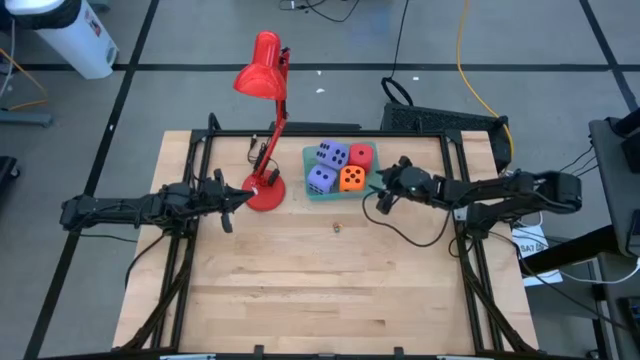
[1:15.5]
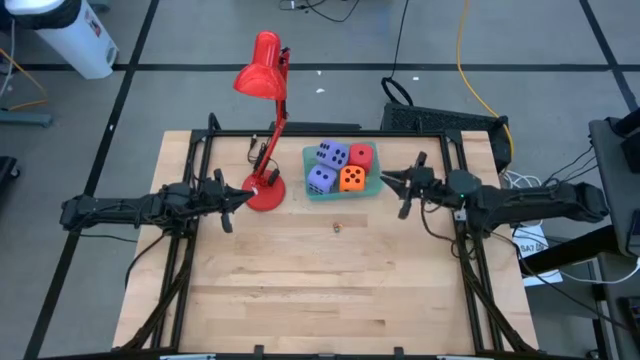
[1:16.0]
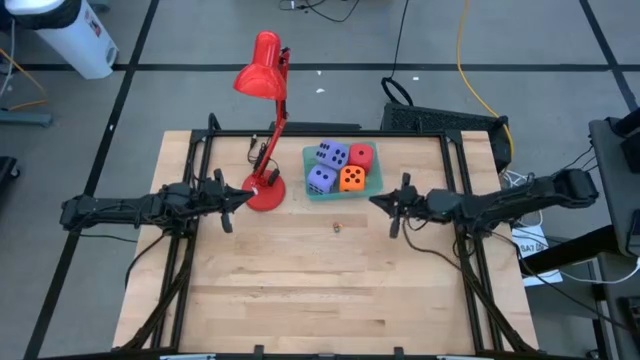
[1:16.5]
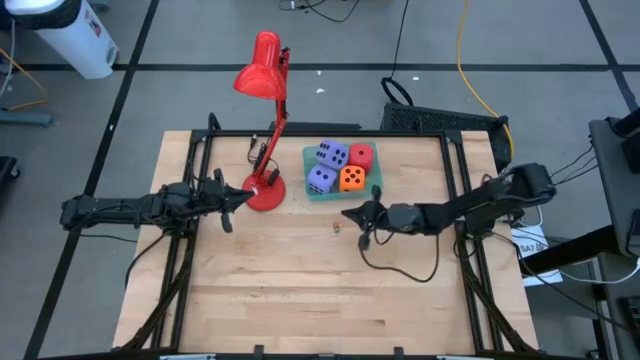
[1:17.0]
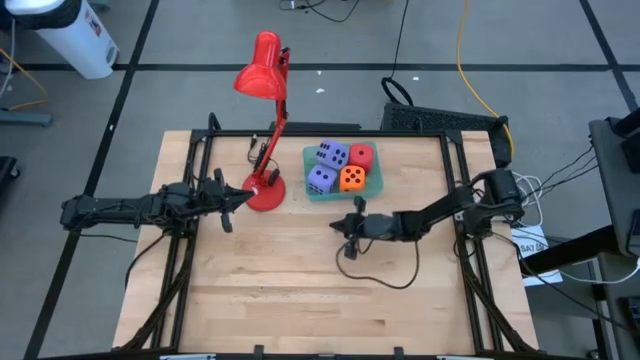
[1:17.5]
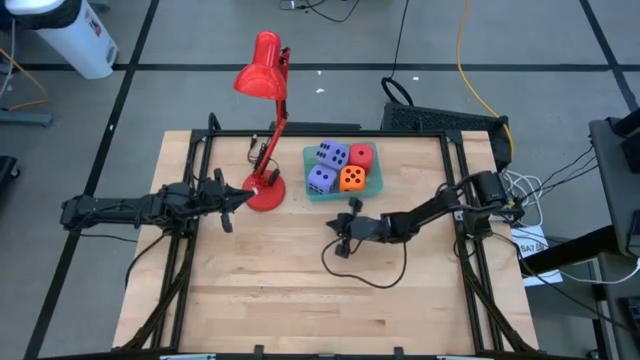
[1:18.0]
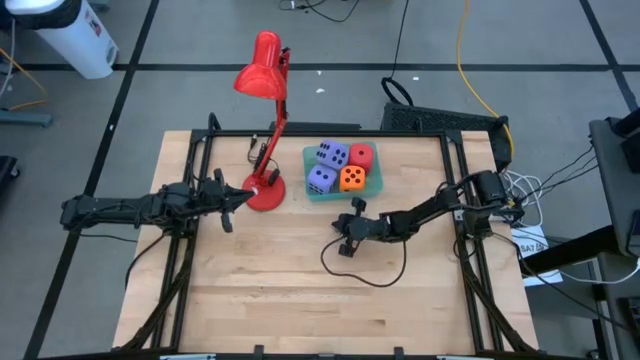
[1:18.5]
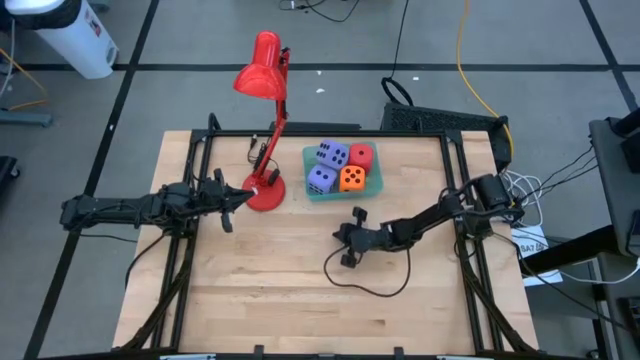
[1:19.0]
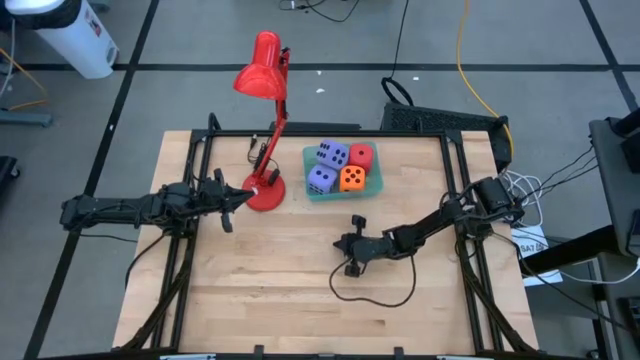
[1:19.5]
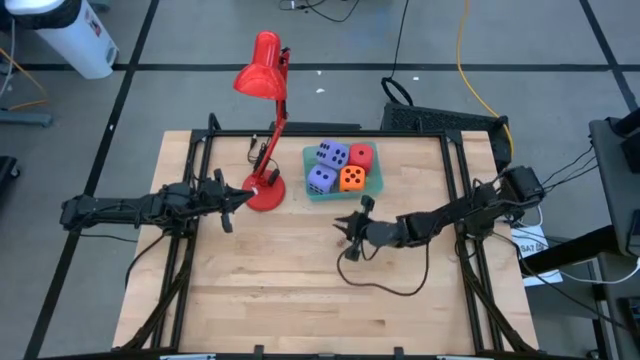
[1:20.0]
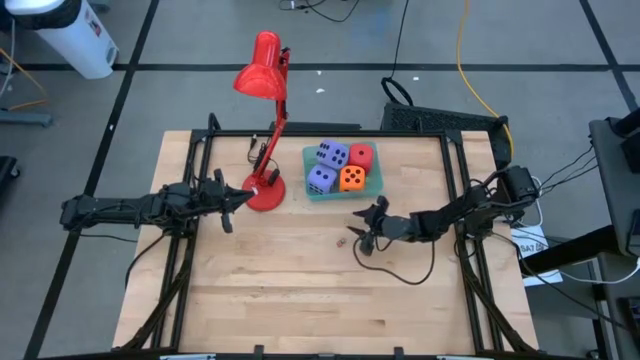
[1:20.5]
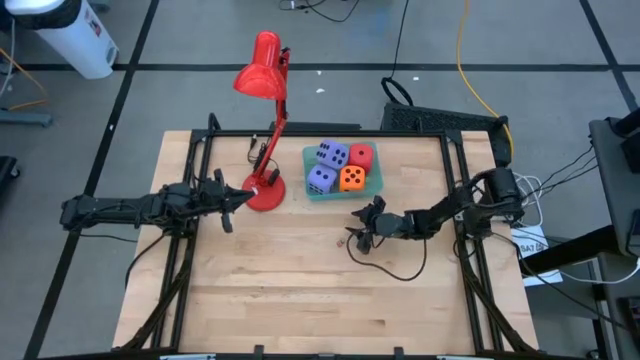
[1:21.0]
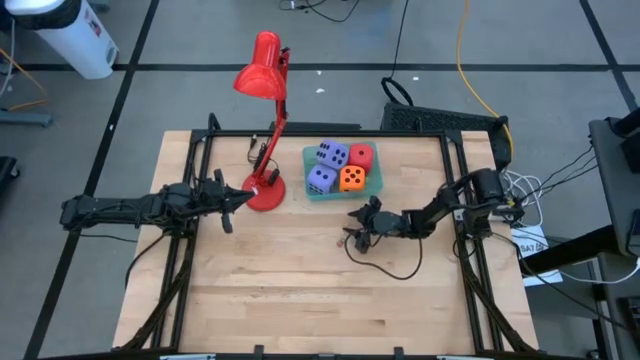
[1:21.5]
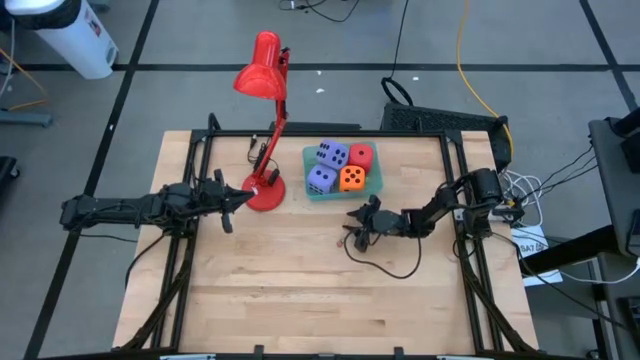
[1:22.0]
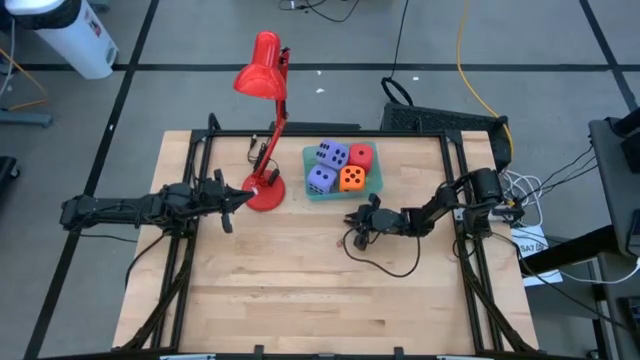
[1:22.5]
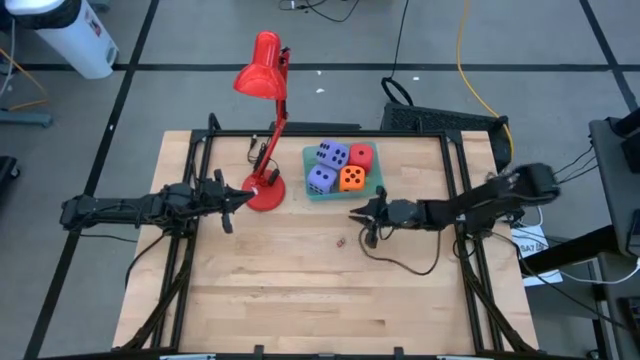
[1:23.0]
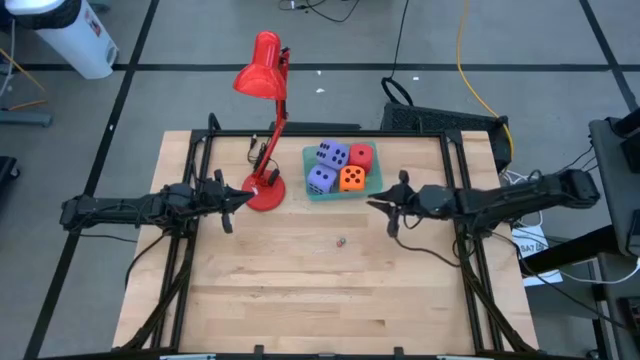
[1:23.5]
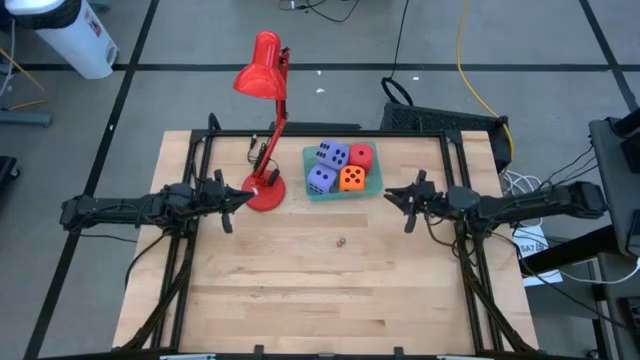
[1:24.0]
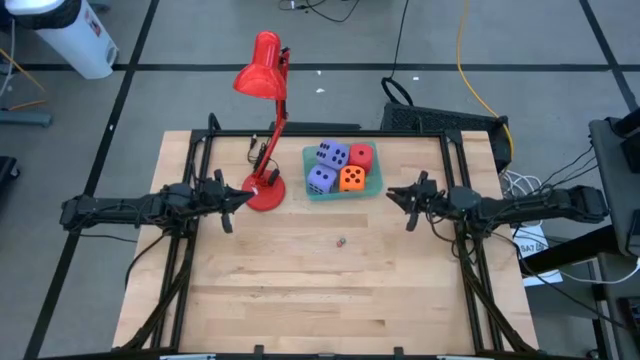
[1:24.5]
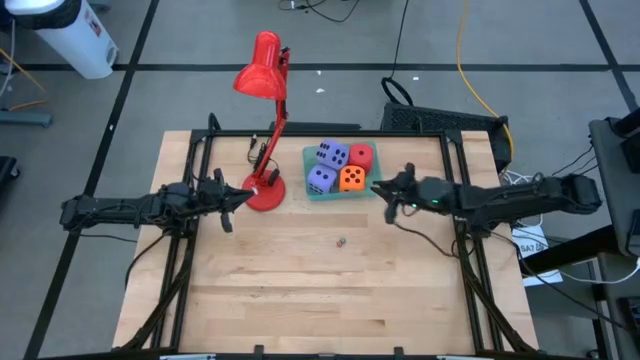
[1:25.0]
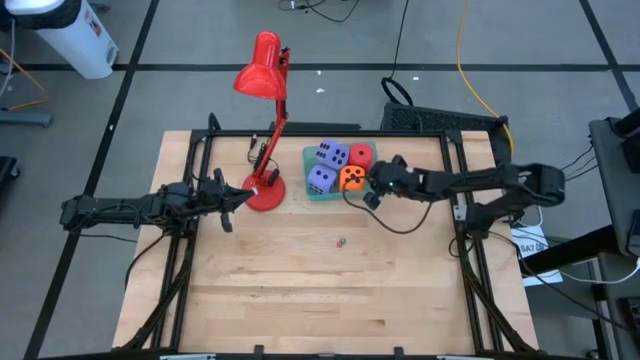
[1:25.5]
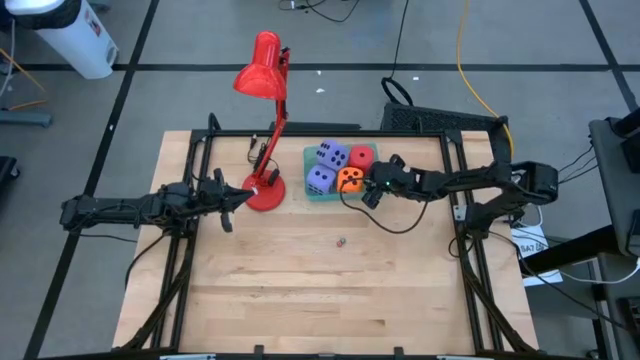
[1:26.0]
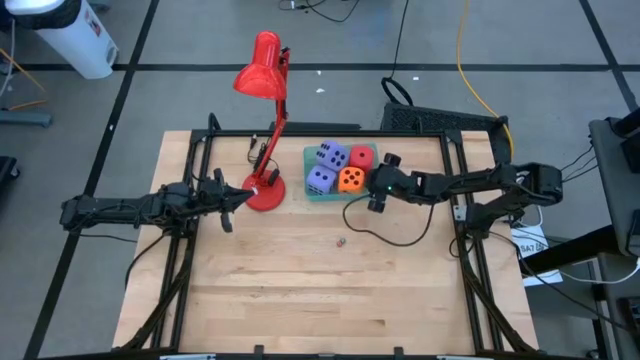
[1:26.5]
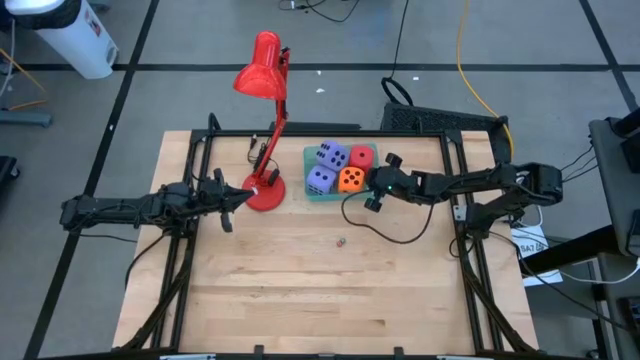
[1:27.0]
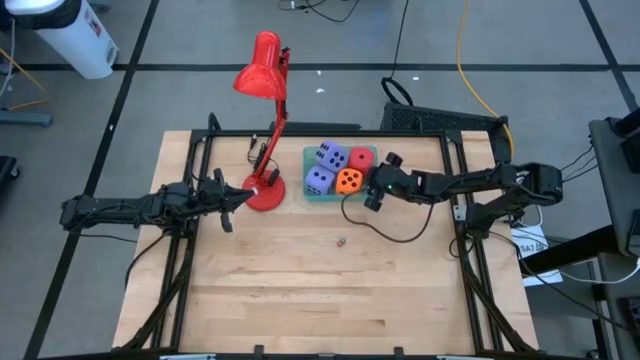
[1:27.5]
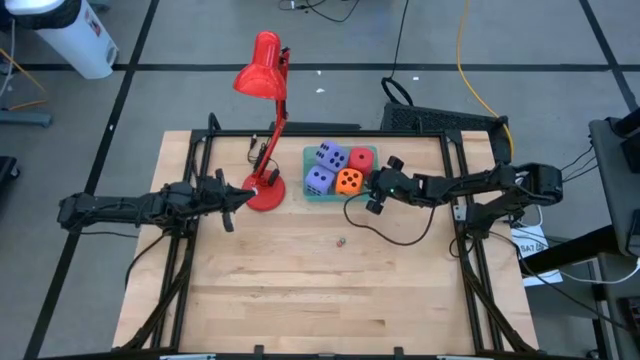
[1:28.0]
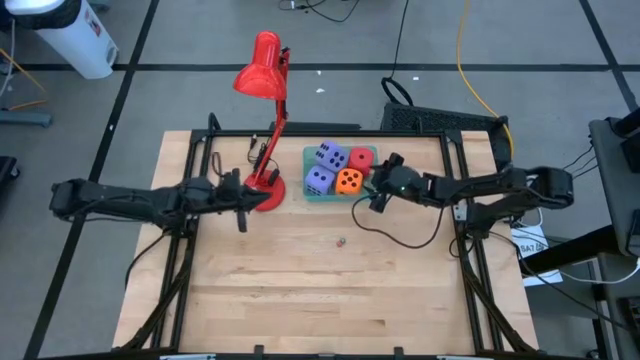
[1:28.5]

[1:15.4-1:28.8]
Task: Pick & Place Dice
Put the yellow small die into the green bin

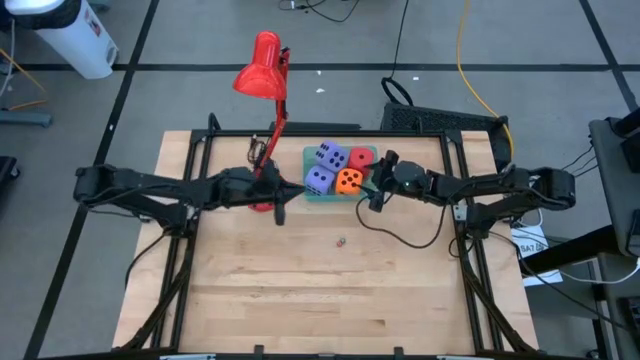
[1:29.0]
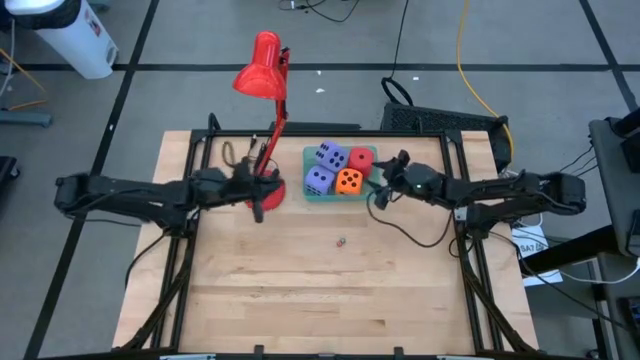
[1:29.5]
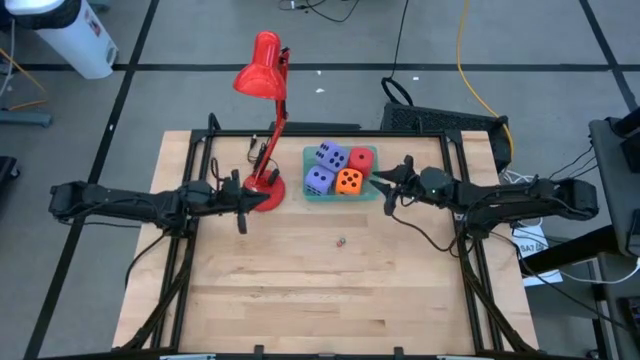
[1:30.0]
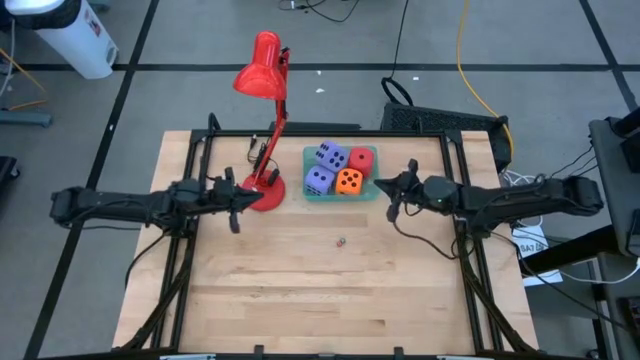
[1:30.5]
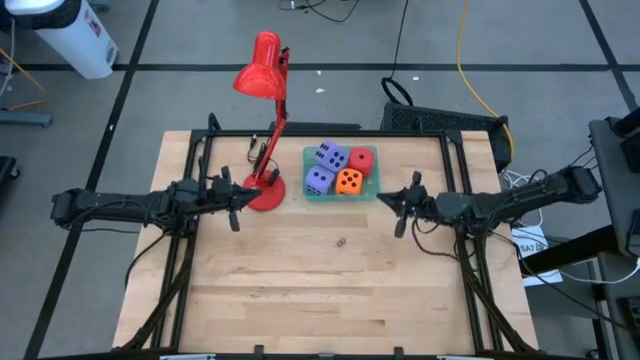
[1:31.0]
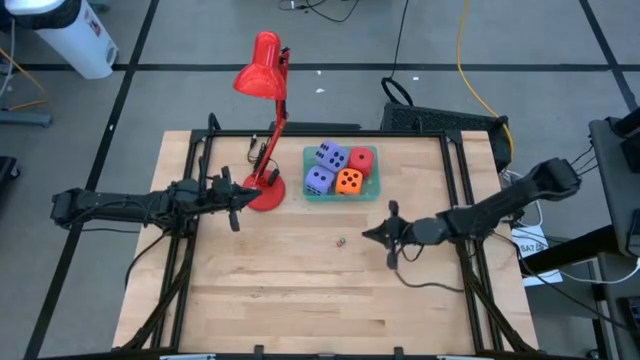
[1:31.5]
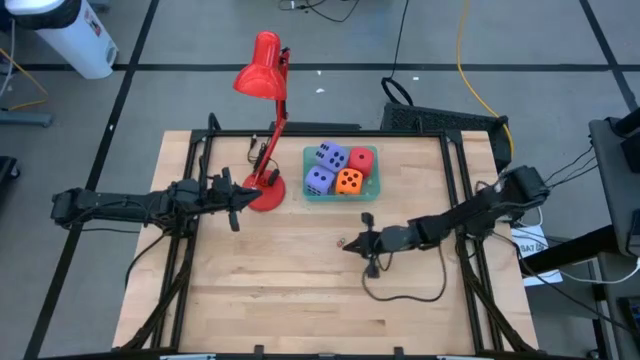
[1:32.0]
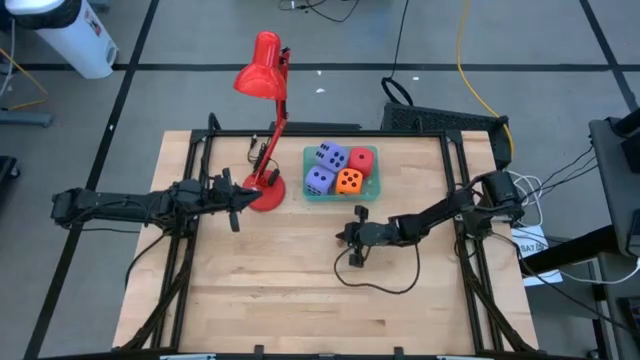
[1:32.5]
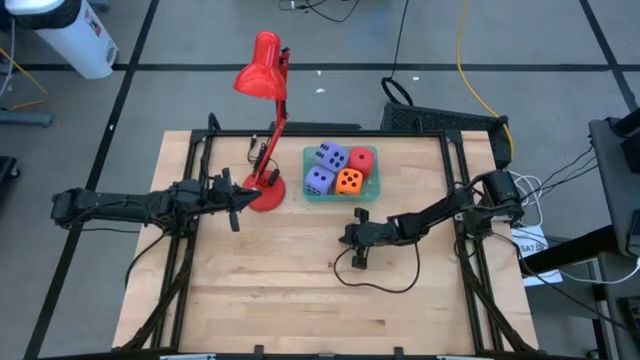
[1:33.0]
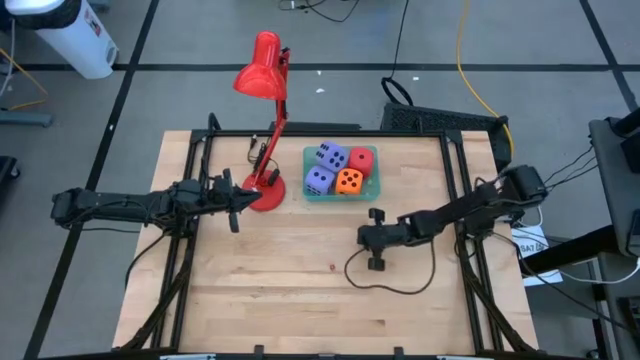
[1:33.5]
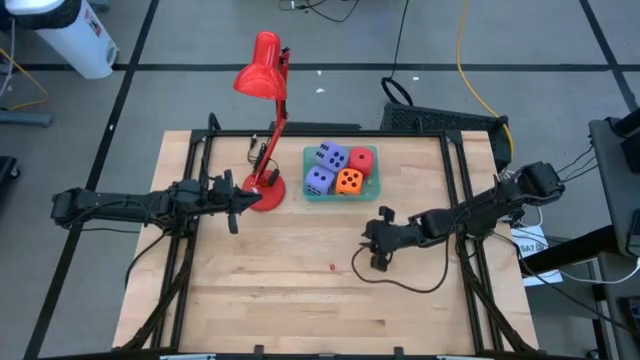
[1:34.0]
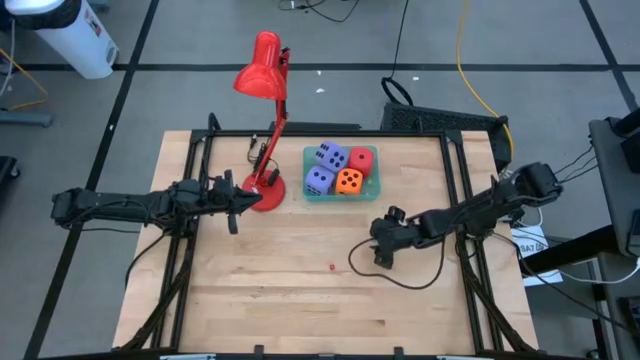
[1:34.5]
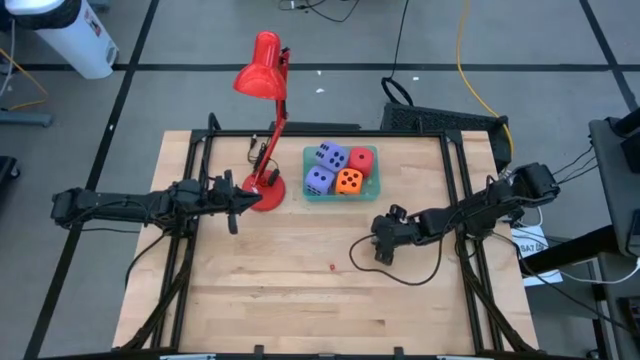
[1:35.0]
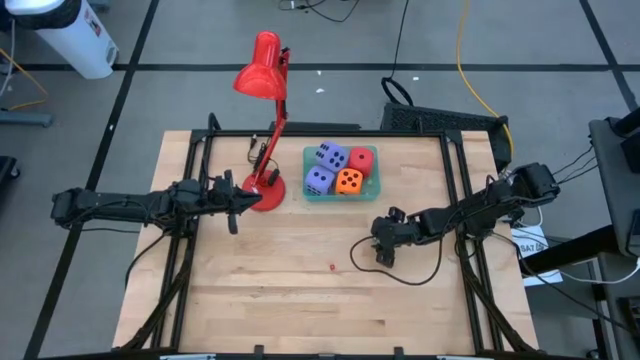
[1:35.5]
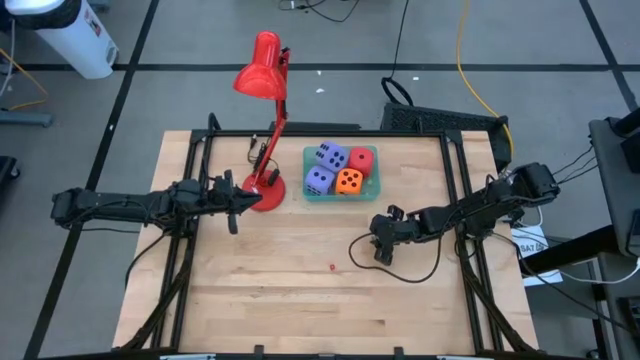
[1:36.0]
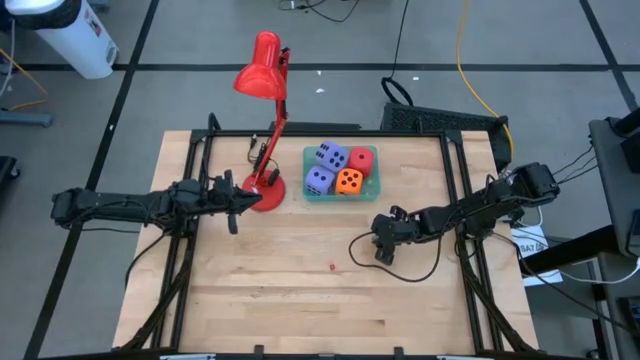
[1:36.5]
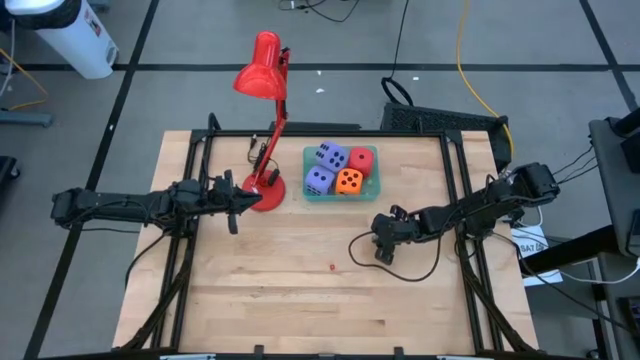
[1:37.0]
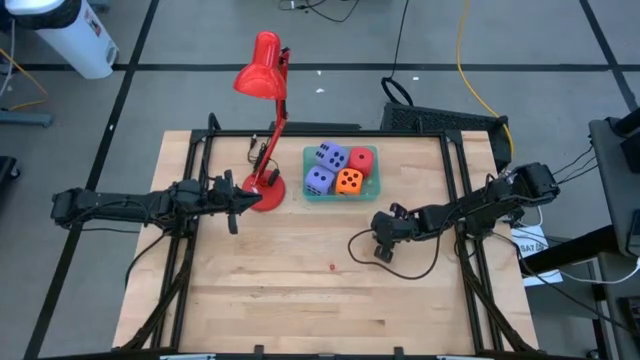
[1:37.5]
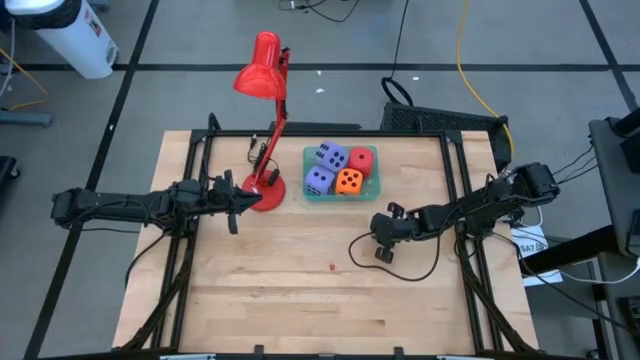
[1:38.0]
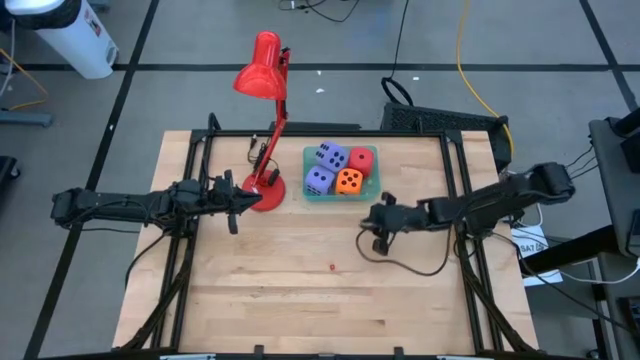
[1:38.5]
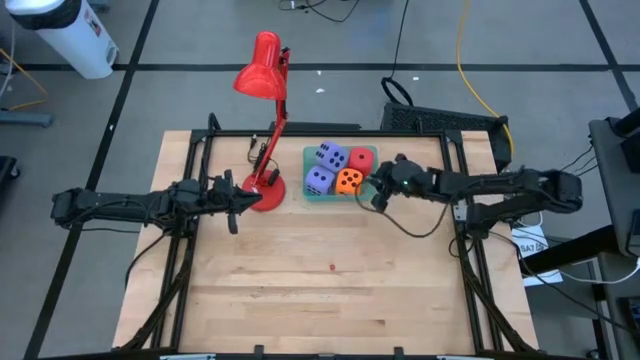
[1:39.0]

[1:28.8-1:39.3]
Put the green small die into the green bin
